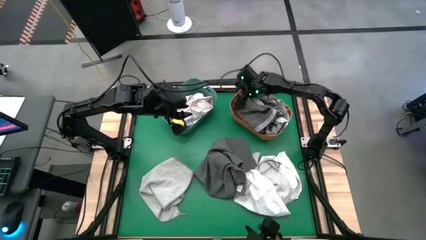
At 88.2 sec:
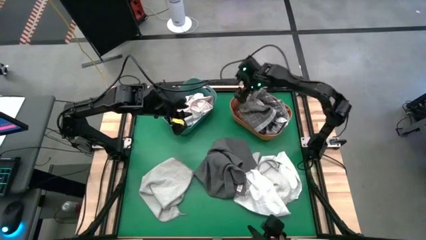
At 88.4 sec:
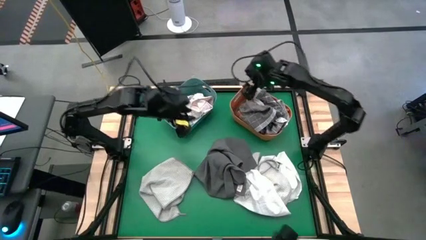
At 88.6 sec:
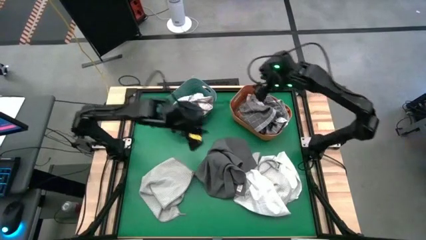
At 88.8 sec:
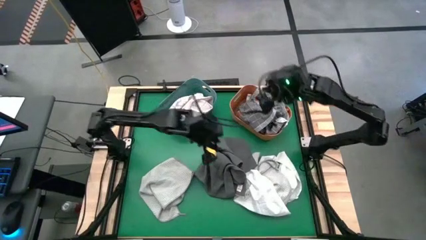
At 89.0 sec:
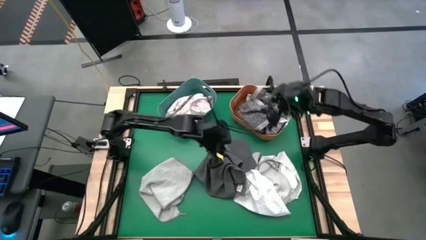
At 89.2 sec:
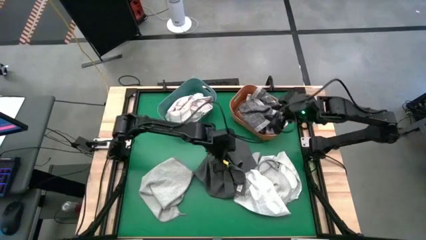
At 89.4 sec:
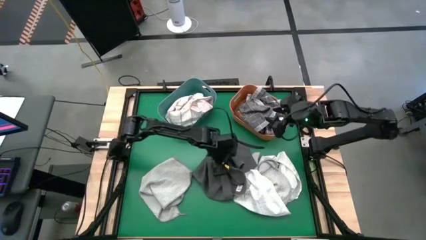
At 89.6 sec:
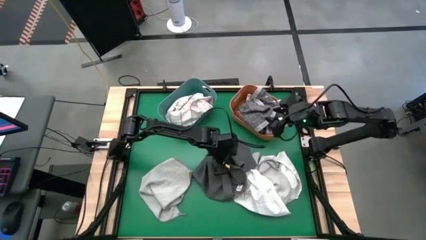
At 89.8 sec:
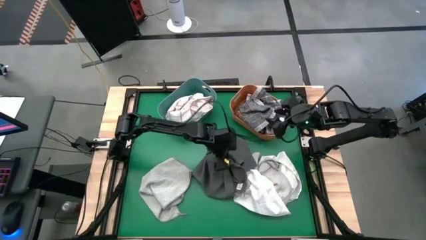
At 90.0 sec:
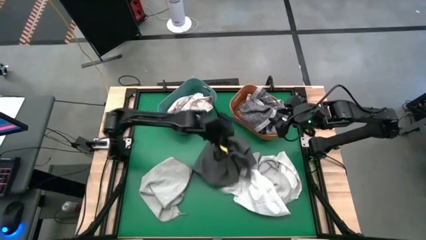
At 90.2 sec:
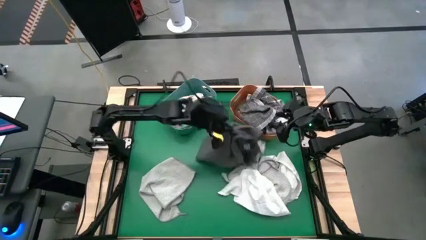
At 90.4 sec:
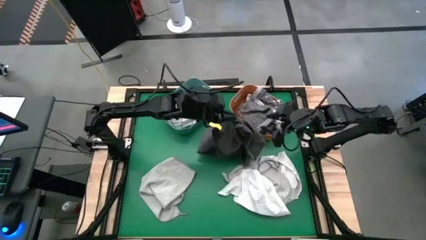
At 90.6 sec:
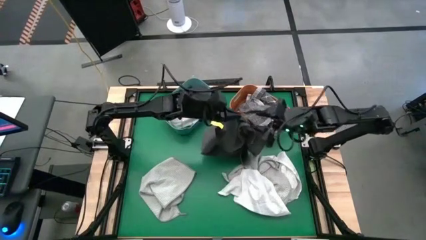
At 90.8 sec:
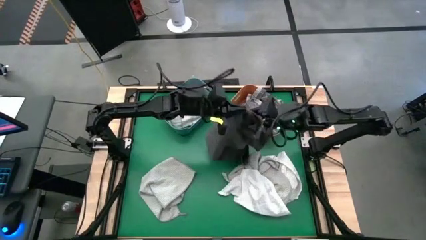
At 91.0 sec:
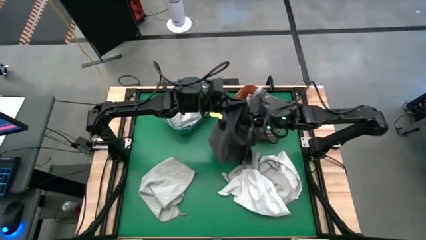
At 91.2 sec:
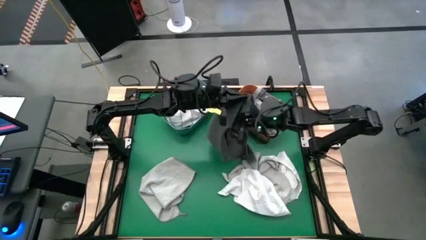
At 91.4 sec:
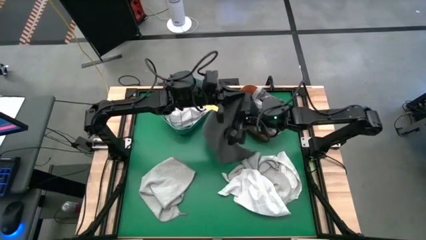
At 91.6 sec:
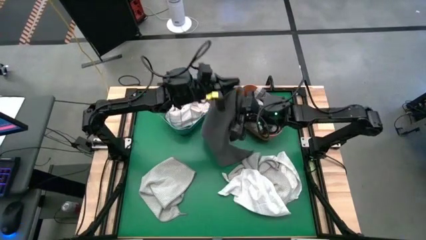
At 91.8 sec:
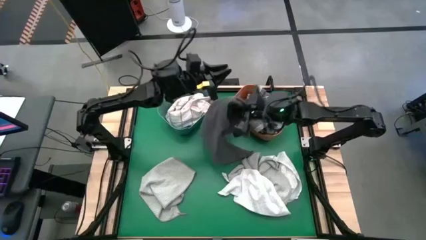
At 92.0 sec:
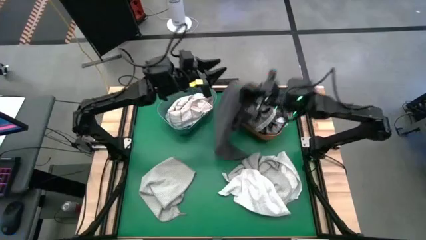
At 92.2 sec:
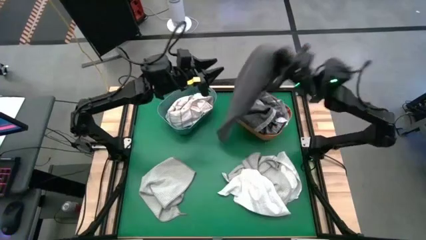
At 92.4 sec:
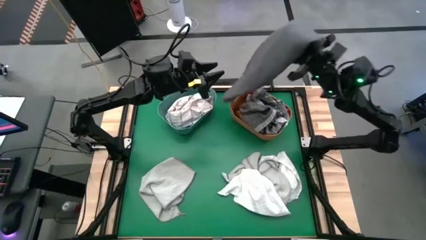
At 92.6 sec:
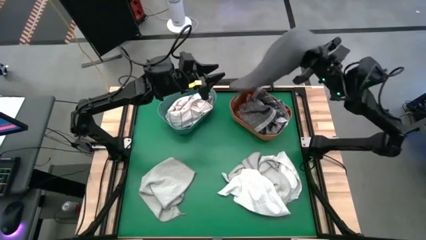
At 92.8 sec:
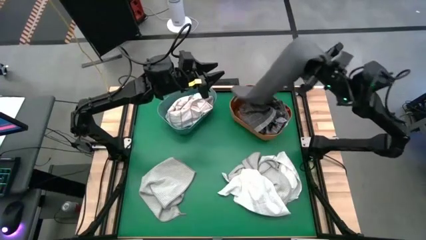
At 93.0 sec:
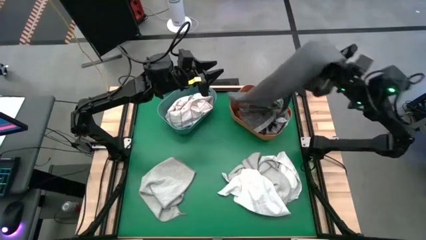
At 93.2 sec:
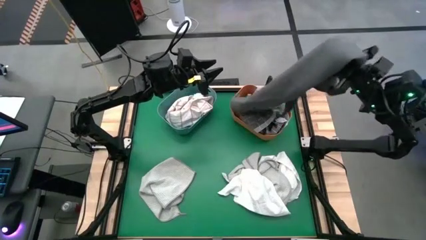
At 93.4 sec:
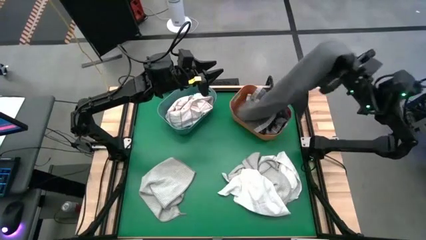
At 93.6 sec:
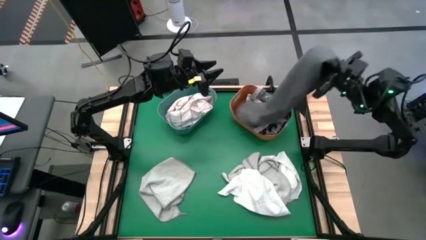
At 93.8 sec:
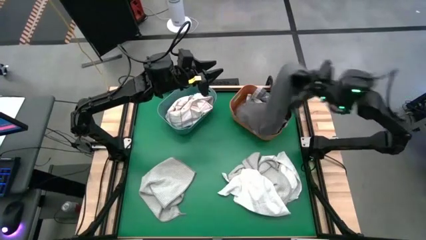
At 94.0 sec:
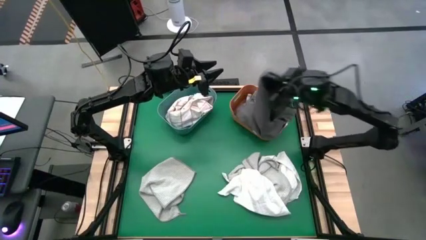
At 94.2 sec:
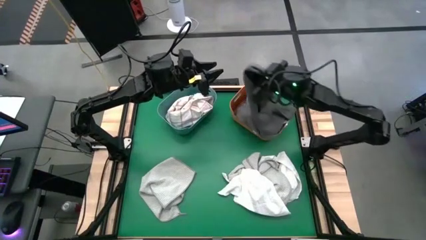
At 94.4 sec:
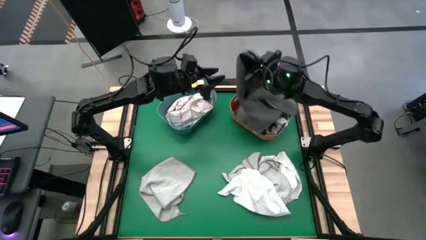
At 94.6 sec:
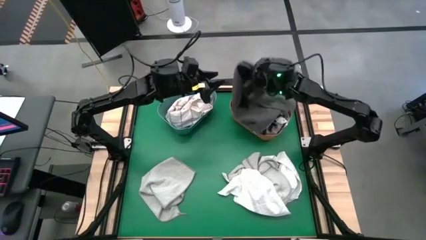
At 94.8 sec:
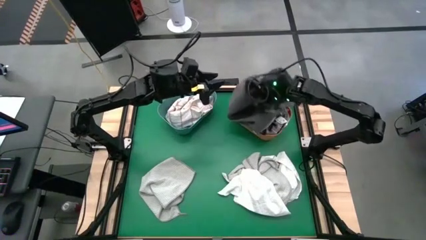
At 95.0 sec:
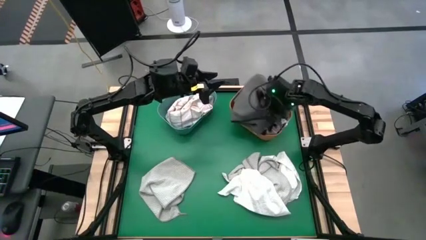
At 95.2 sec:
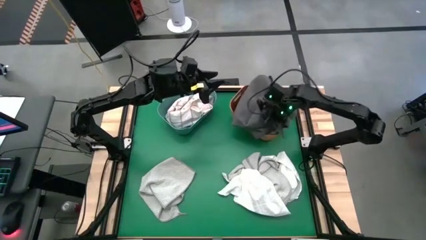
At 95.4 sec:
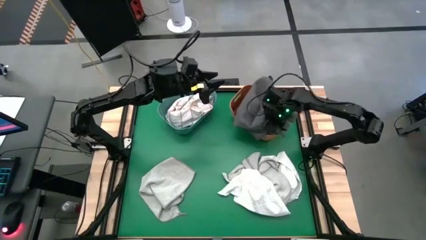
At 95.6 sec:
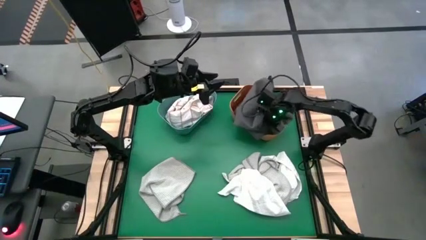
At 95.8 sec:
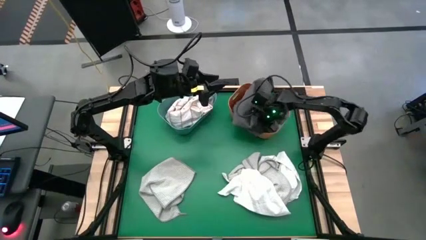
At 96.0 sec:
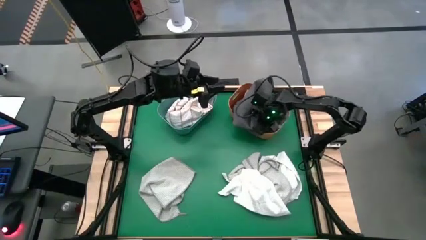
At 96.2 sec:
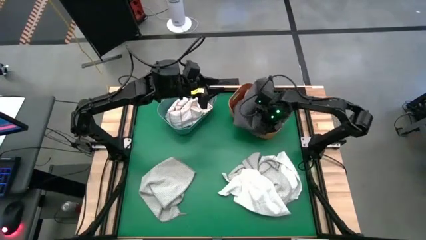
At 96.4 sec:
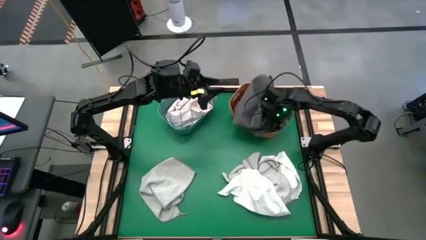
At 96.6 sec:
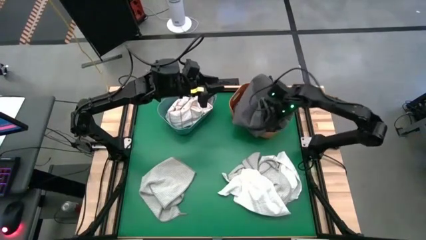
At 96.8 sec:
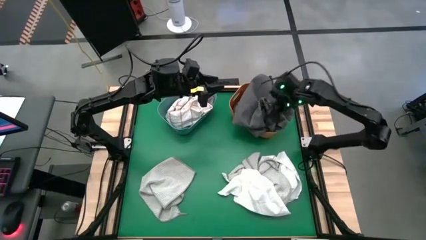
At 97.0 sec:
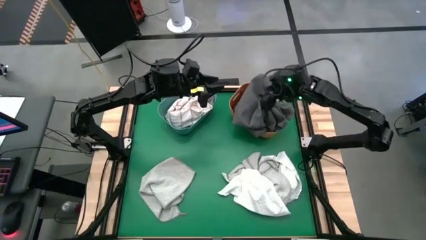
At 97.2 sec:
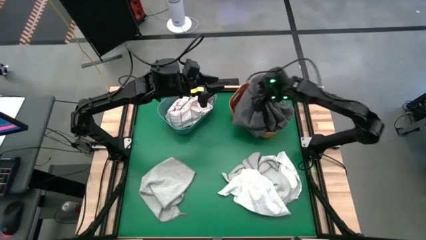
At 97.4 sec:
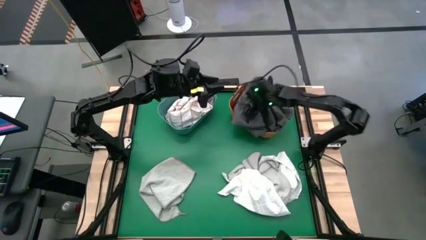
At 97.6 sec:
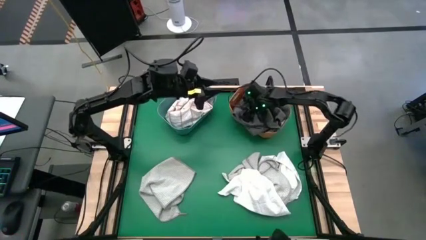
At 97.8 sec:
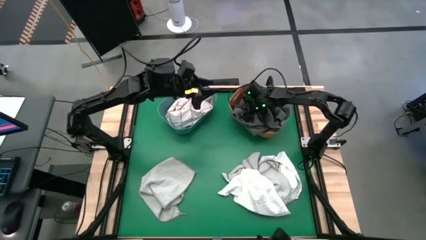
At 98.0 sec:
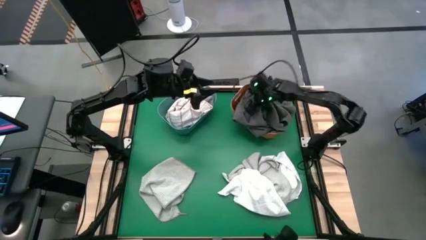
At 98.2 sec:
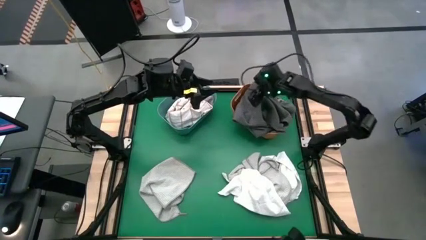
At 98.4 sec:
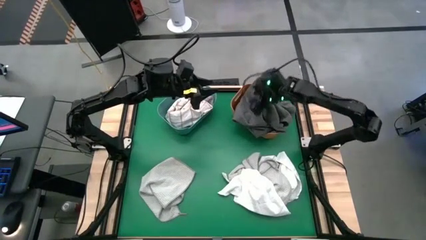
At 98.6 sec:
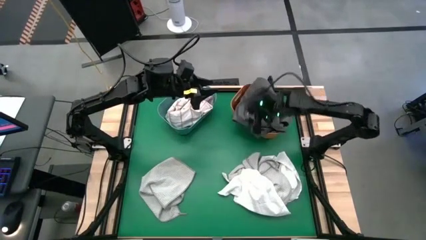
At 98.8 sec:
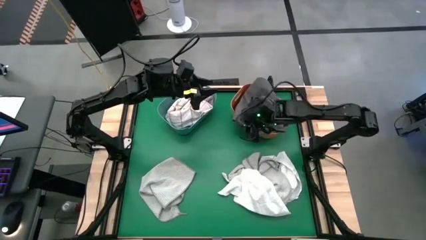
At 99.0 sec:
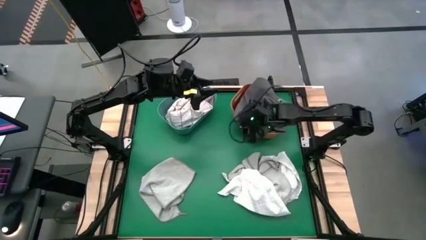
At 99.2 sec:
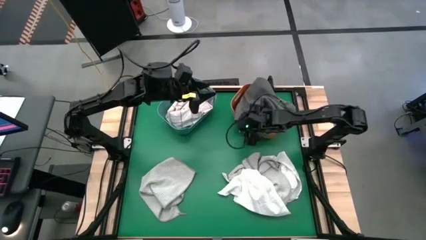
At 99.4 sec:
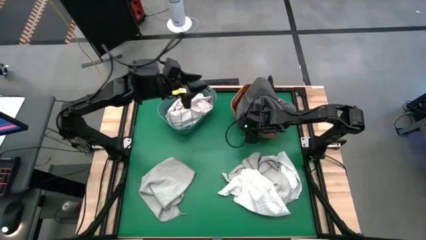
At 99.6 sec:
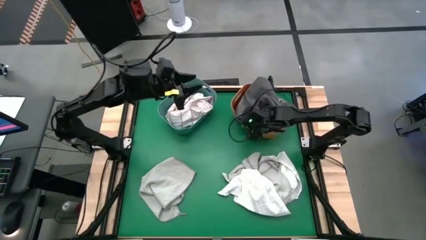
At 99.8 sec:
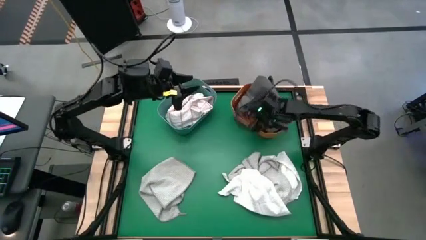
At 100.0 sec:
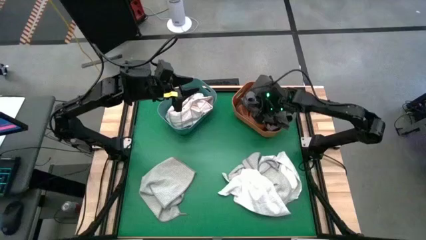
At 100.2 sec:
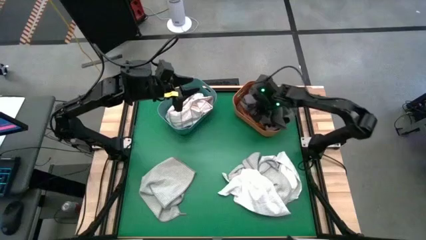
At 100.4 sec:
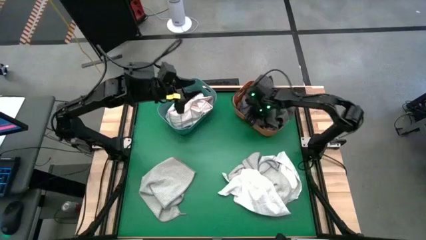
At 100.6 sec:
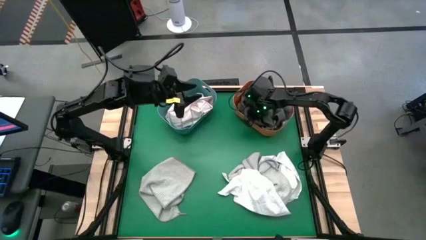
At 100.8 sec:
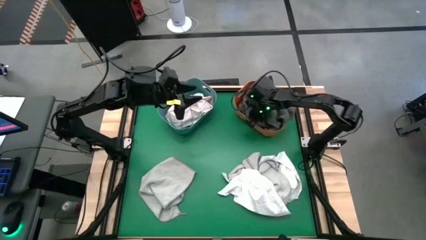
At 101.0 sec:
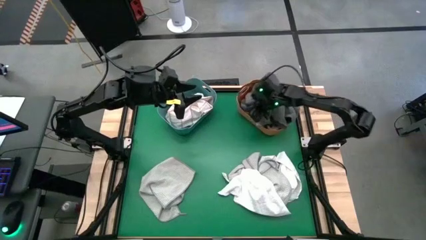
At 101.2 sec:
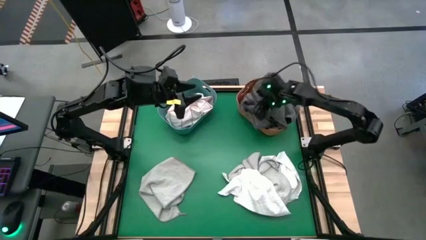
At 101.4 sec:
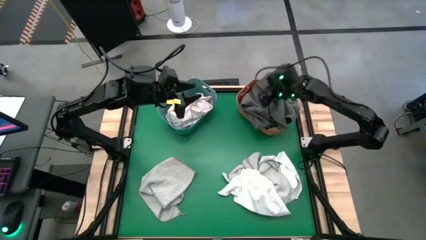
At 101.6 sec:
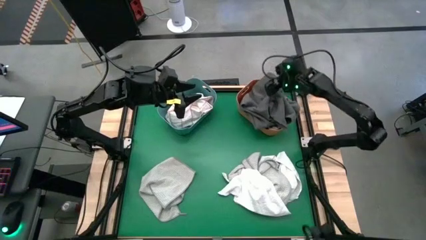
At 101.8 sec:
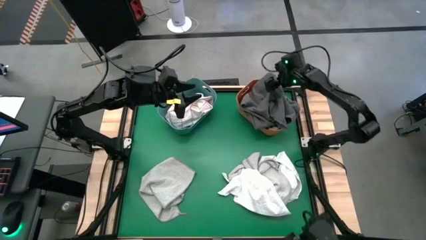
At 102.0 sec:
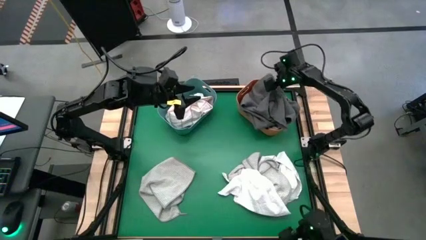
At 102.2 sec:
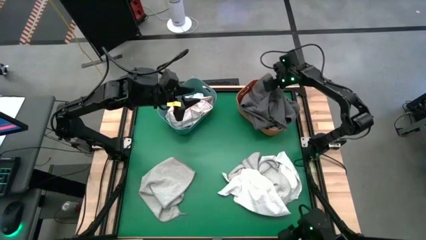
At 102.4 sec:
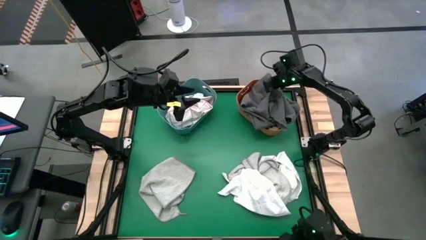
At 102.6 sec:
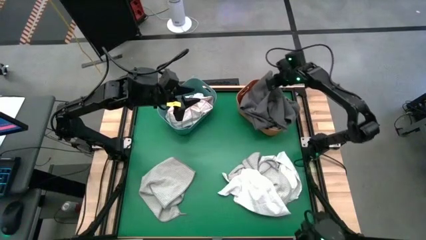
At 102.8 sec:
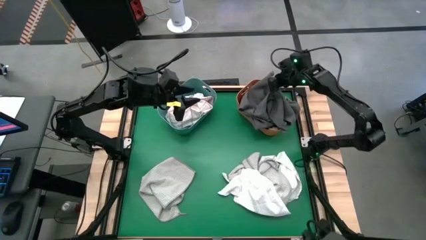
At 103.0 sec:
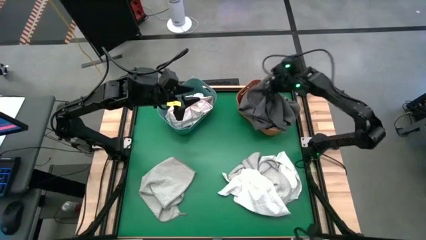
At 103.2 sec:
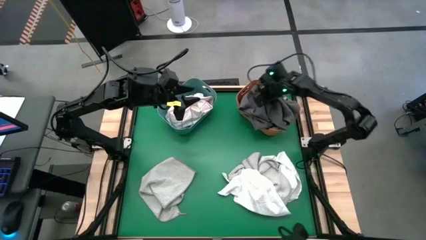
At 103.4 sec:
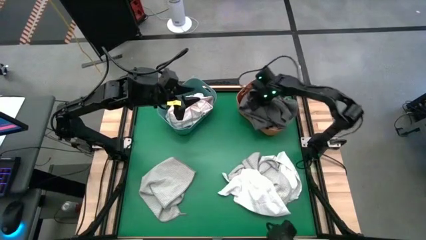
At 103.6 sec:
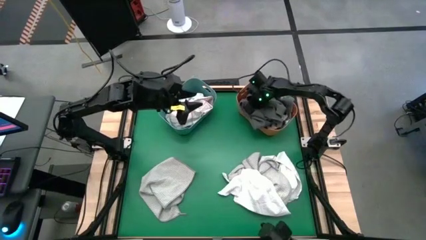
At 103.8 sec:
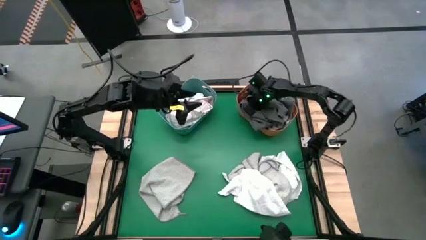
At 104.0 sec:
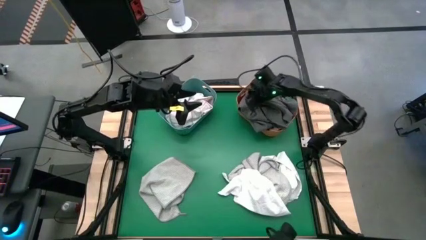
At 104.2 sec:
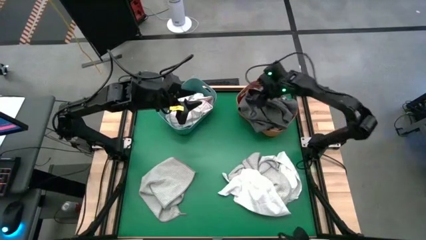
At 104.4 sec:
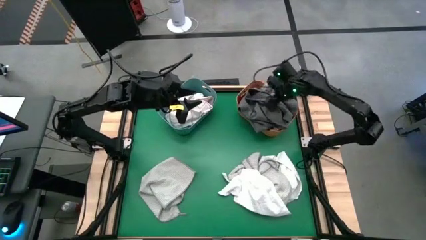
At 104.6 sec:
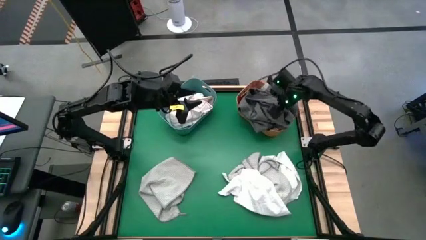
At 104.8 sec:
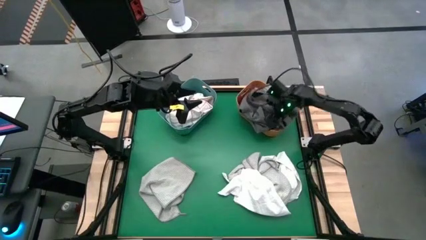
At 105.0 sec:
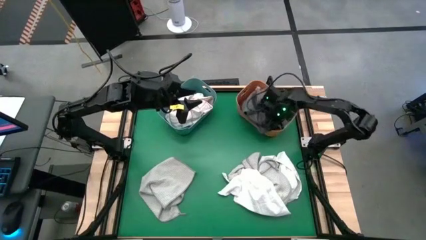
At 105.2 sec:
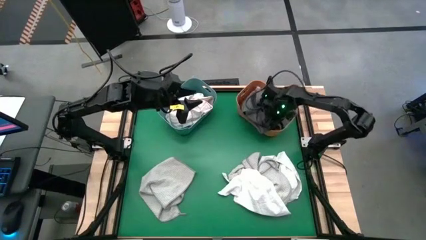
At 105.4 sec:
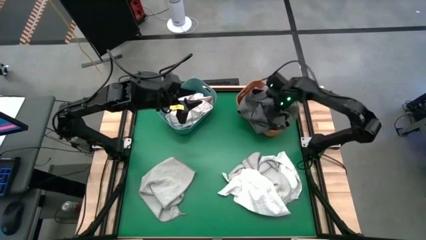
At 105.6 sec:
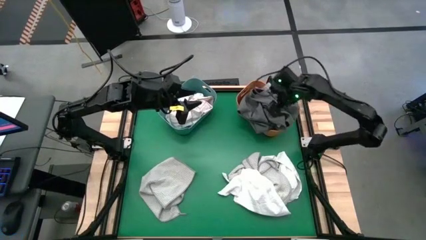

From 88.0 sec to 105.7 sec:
Task: Sort towels by color in basket
Put the dark gray towel into the orange bin
